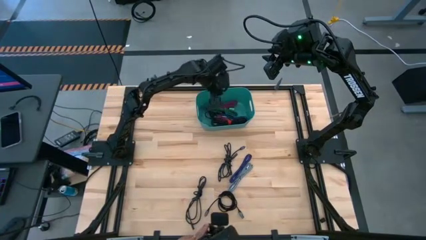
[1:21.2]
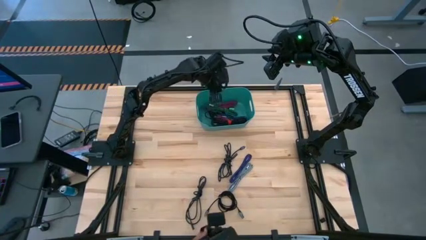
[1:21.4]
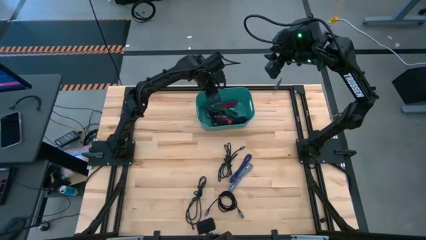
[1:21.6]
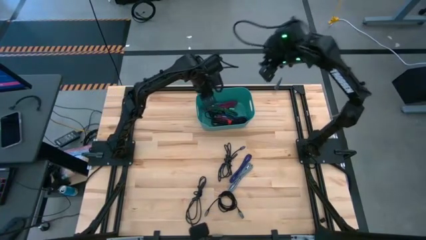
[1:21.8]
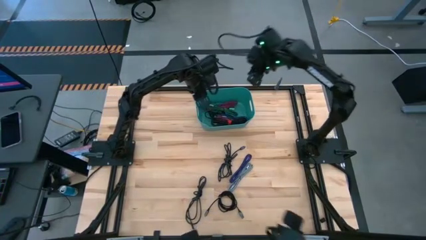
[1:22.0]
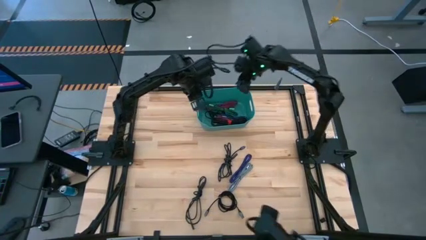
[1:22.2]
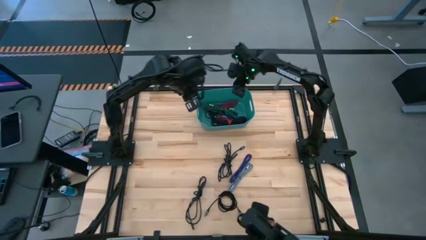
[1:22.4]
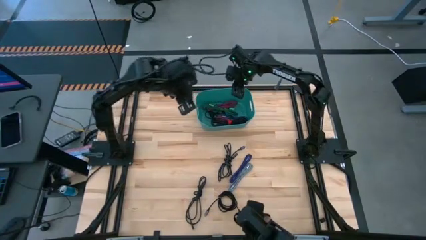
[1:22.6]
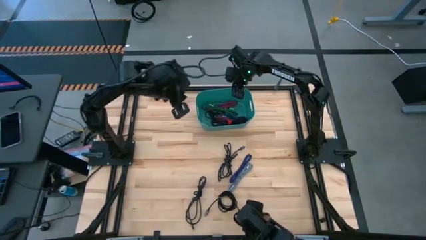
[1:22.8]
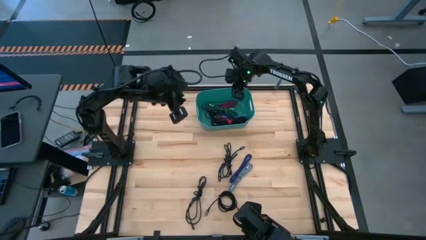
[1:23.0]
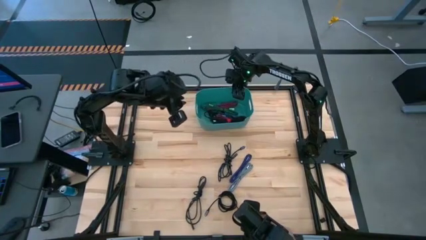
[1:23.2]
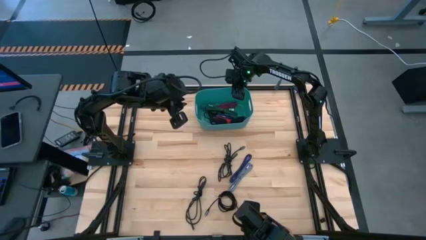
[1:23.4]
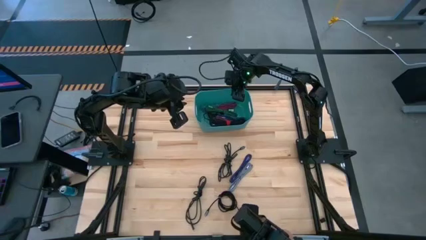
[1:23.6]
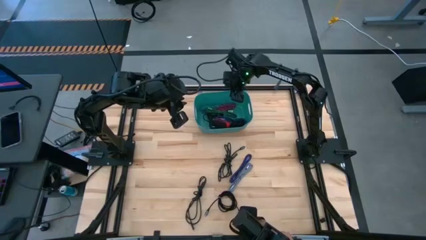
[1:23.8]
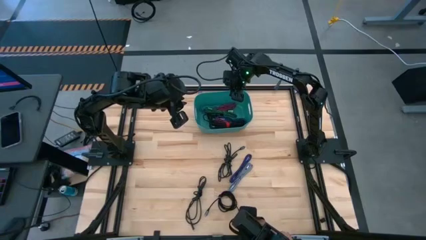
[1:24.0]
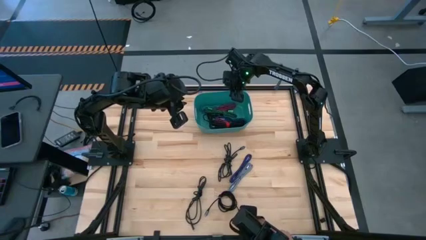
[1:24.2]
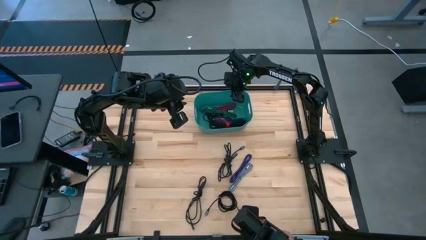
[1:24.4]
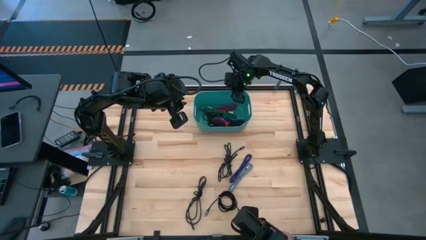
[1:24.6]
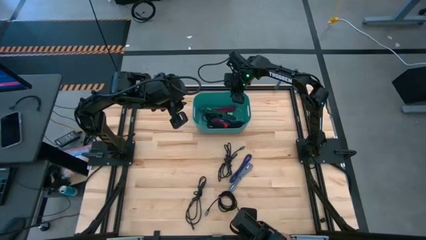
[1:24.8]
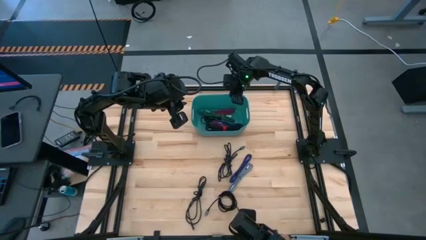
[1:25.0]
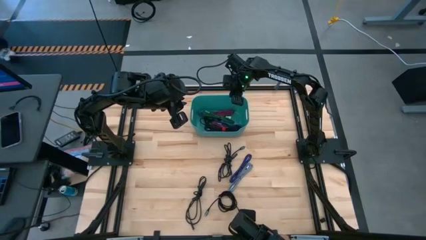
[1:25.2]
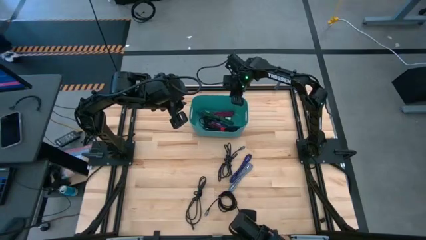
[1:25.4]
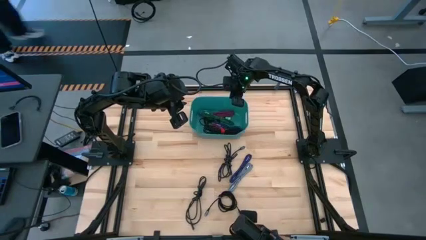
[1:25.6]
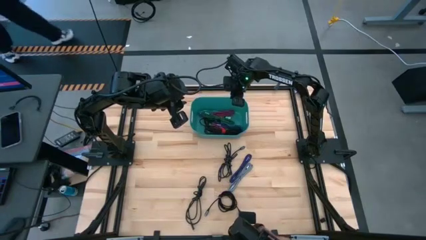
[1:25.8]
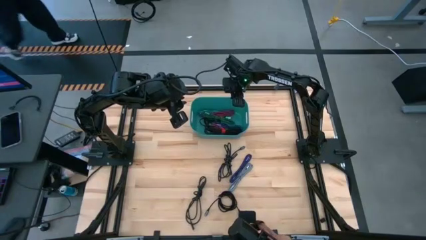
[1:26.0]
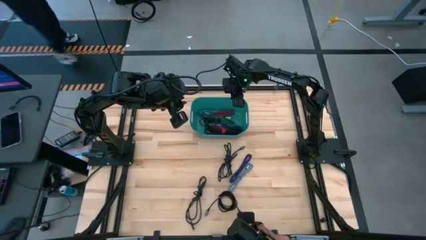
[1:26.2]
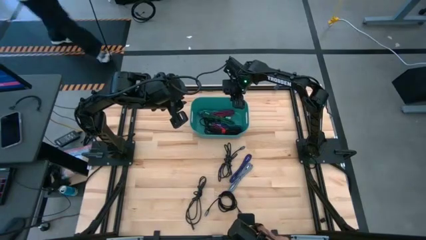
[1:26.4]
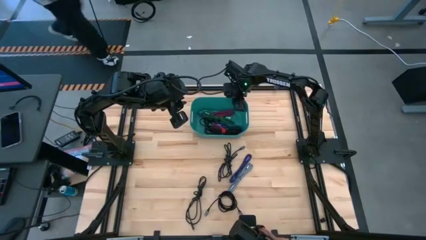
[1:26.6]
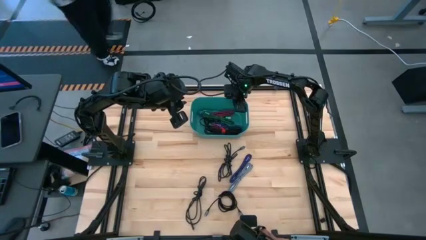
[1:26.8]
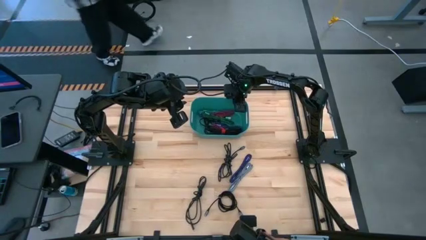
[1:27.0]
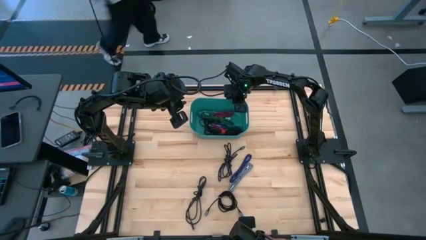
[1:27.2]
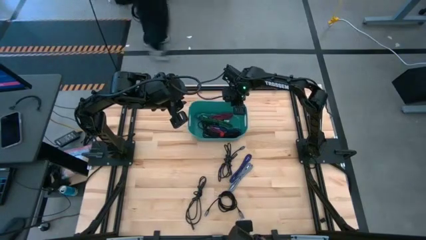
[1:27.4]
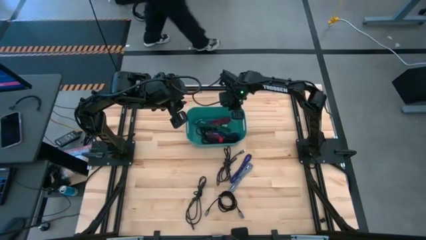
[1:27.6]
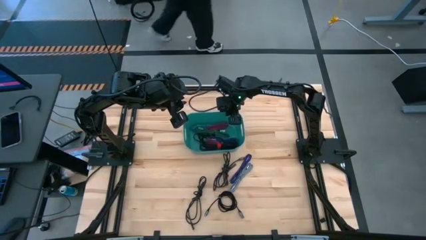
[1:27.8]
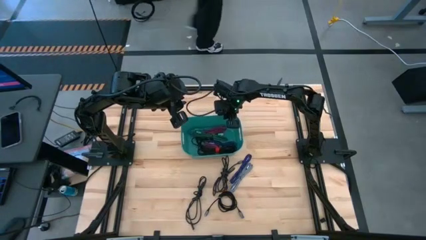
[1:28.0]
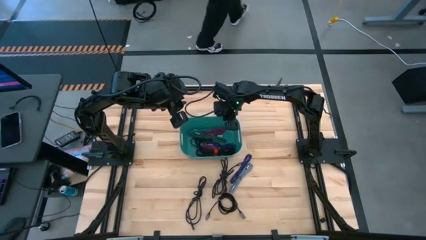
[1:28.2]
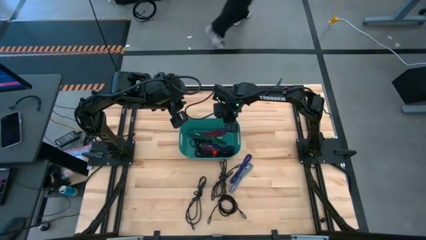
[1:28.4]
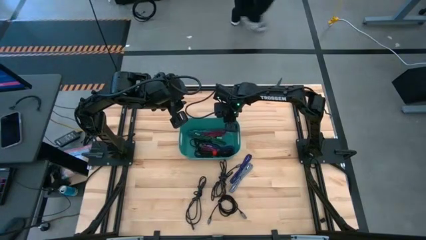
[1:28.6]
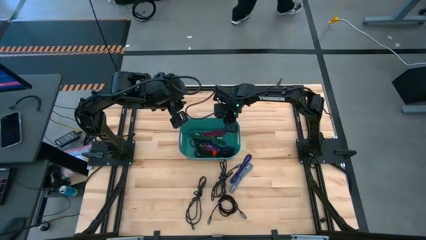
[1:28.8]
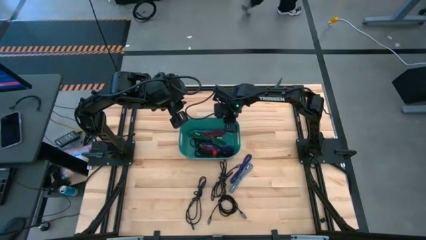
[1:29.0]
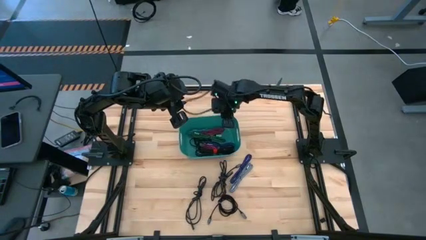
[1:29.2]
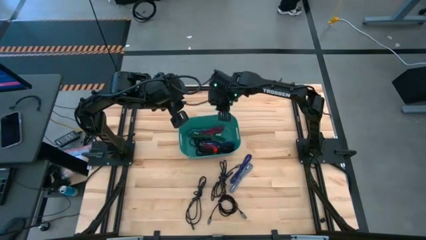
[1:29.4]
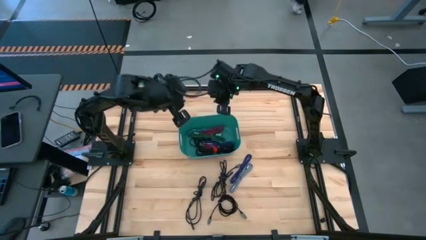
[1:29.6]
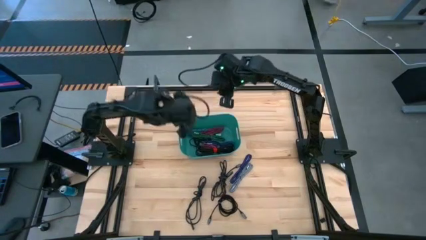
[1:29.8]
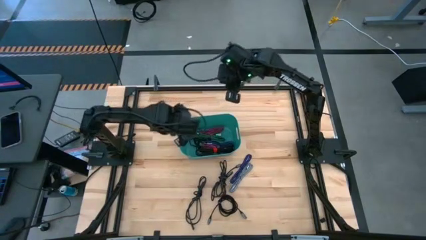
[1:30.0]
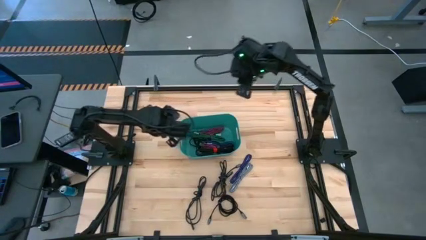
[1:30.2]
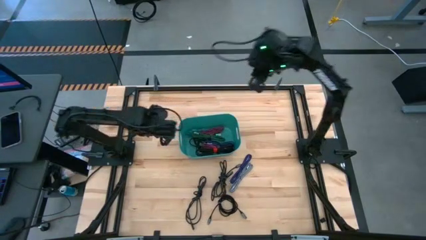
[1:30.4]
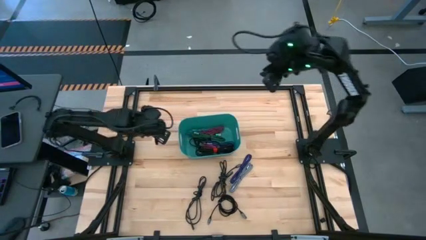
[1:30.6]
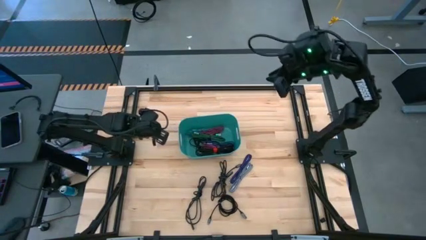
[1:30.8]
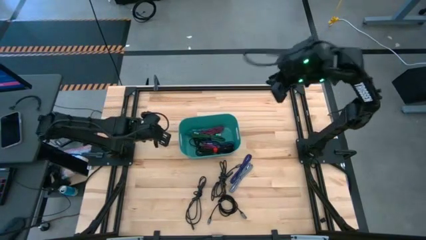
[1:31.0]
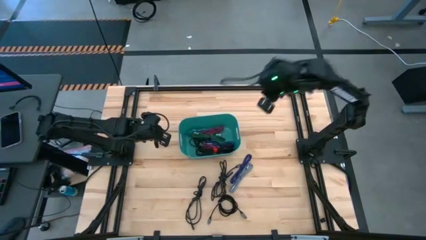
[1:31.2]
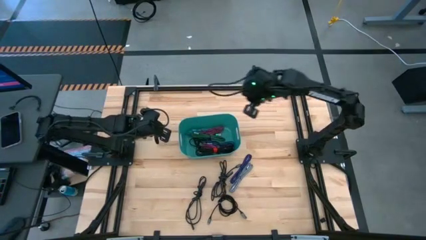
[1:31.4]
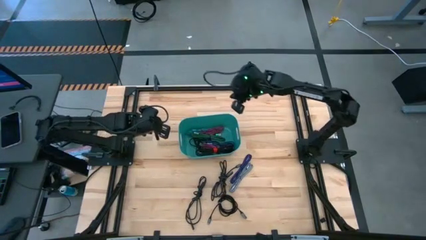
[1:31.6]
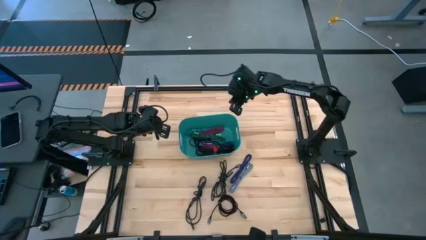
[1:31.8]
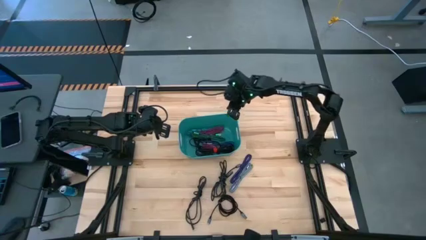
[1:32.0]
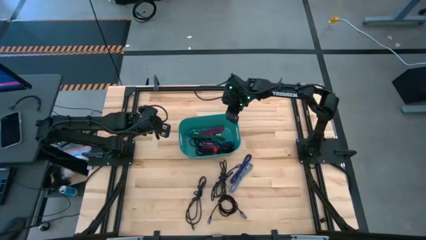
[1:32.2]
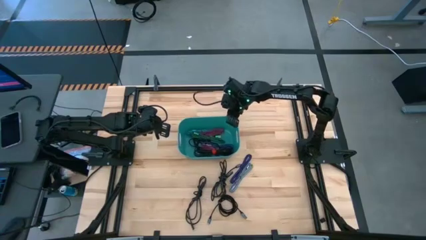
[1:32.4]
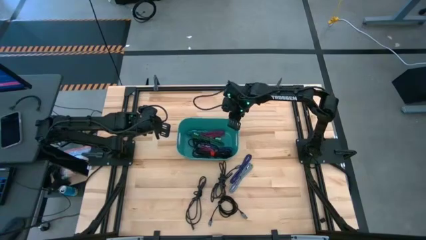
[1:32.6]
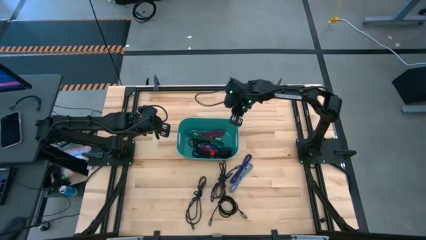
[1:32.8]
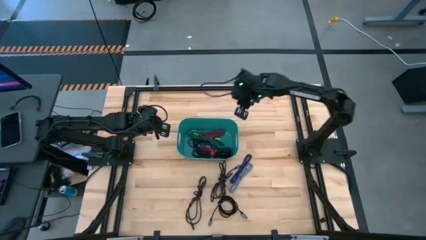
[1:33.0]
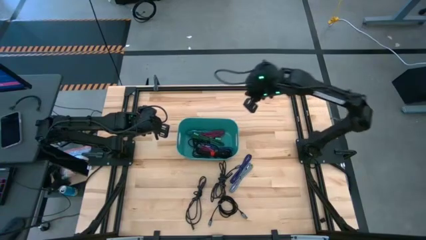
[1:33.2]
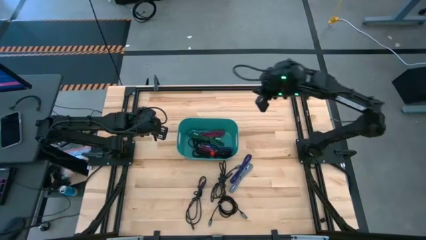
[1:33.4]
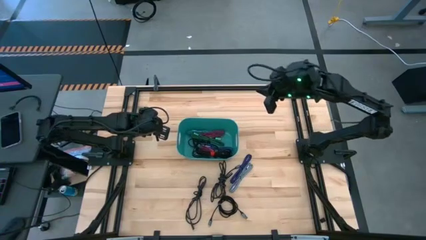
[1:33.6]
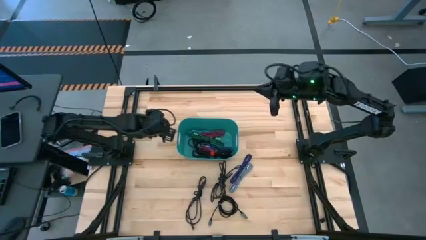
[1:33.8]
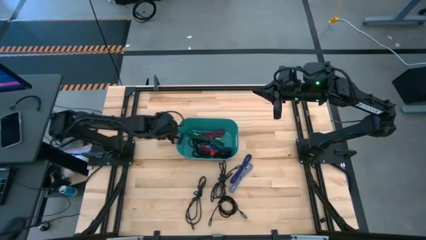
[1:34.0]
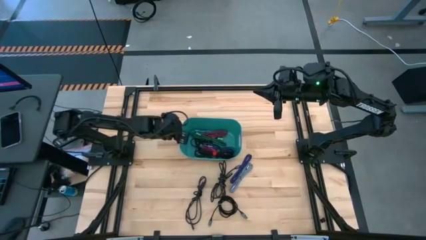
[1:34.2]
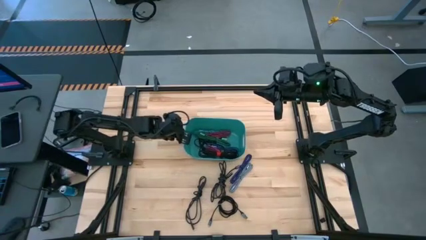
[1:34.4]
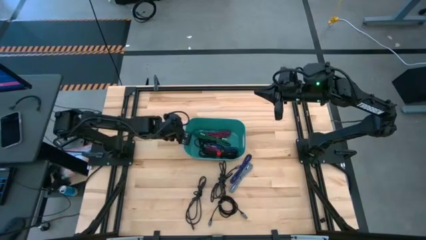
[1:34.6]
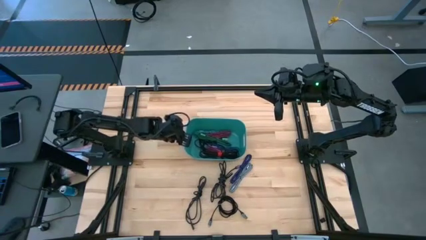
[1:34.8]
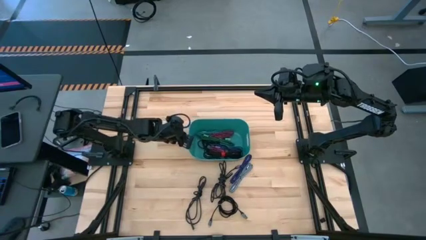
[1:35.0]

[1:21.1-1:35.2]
Task: Pick and place USB-C Cables
Move the light blue bin to the center of the table

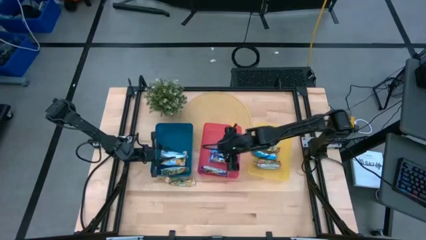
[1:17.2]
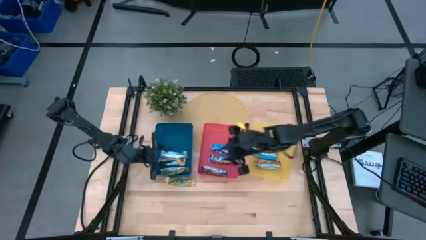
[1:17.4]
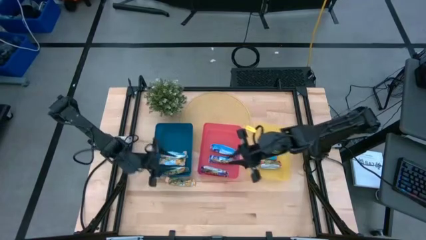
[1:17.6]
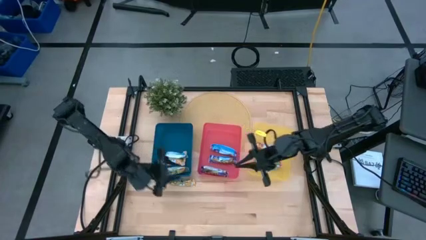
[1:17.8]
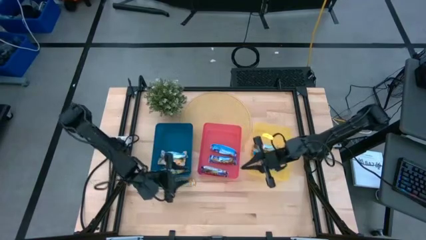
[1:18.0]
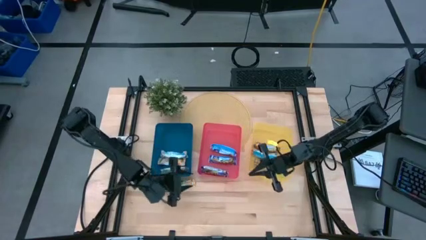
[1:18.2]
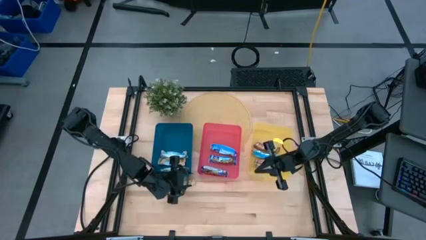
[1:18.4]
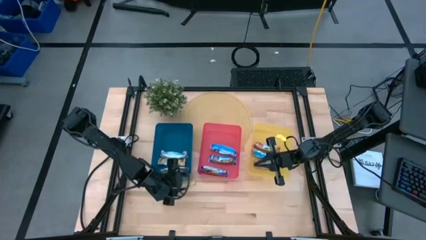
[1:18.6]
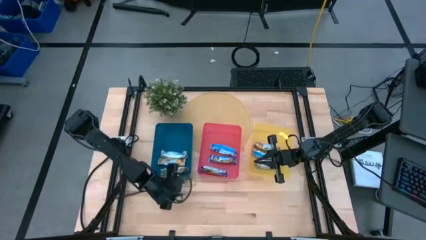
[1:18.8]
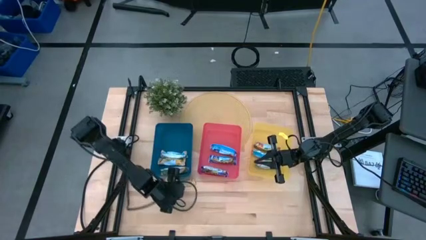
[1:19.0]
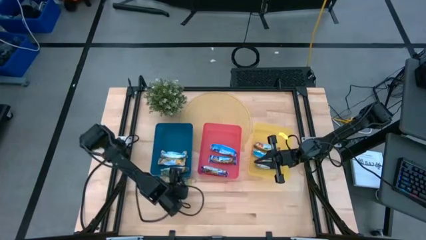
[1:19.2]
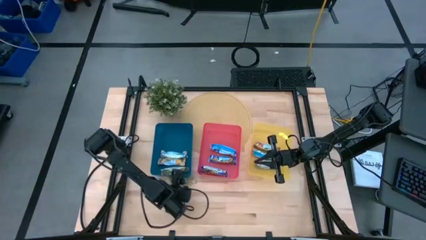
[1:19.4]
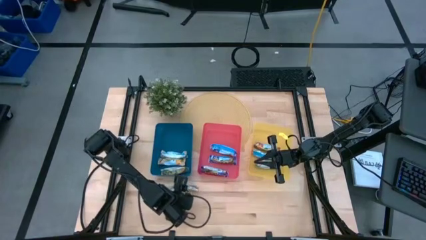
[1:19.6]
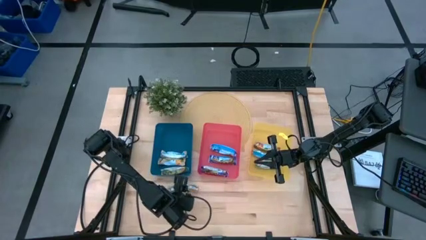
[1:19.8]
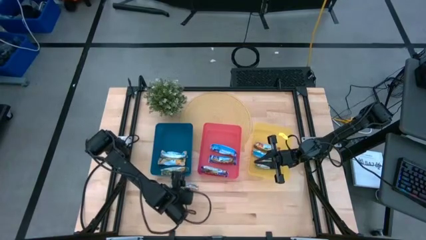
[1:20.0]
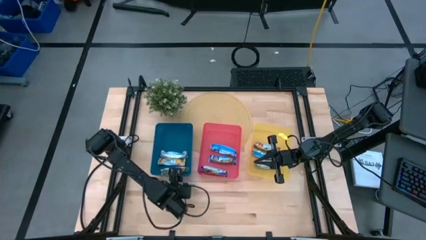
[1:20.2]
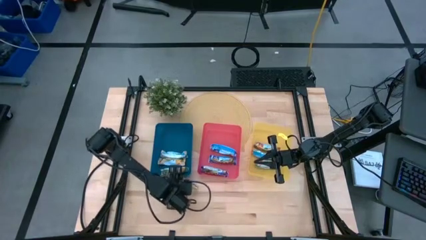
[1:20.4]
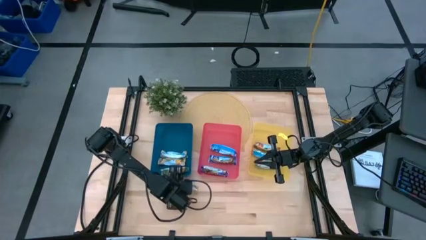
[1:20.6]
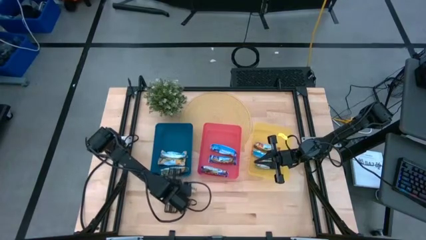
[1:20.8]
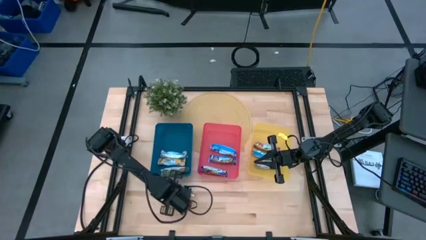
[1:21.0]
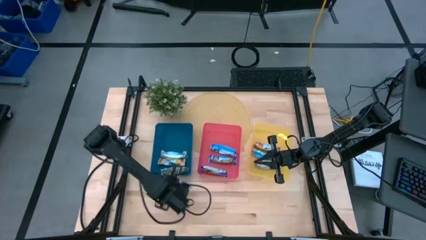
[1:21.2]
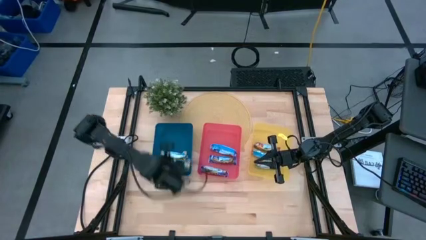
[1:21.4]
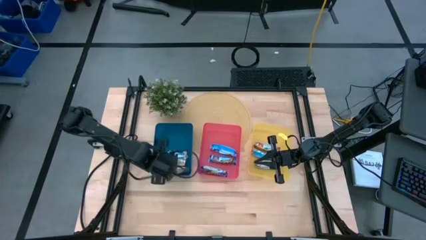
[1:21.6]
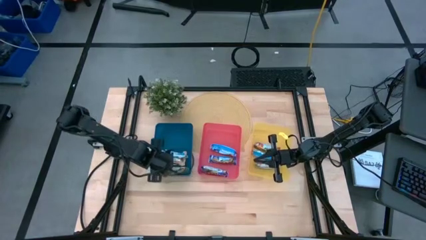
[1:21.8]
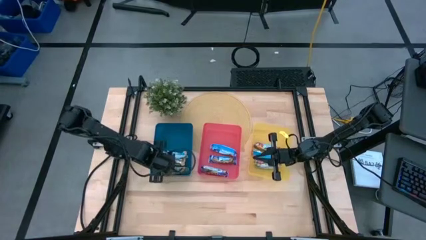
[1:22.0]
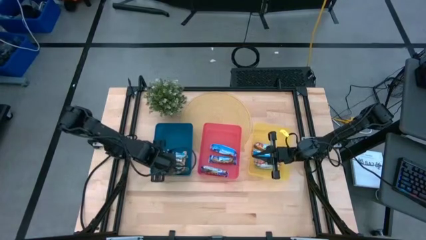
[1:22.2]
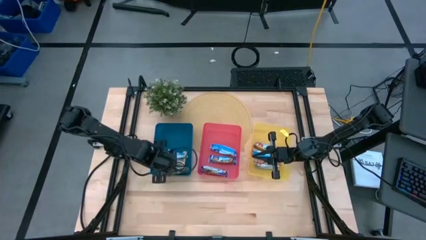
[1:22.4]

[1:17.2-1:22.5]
Task: Pick and place Granola Bars by type
Put the orange granola bar into the blue bin
